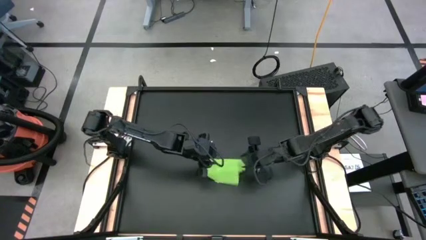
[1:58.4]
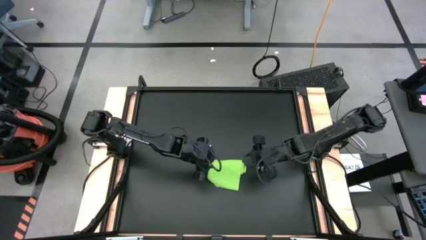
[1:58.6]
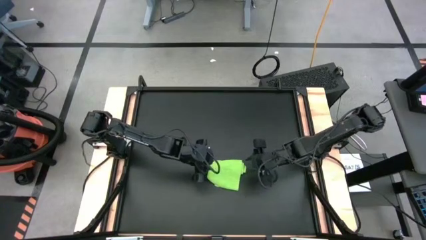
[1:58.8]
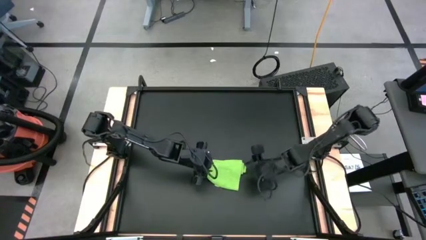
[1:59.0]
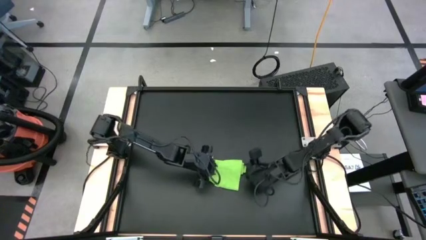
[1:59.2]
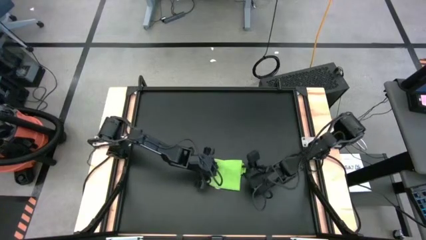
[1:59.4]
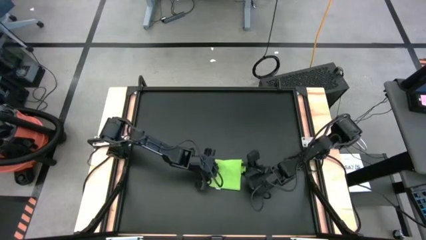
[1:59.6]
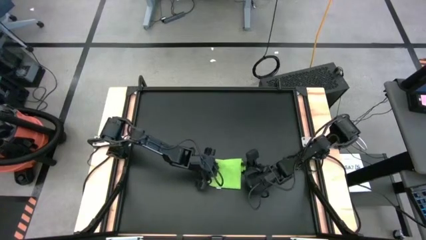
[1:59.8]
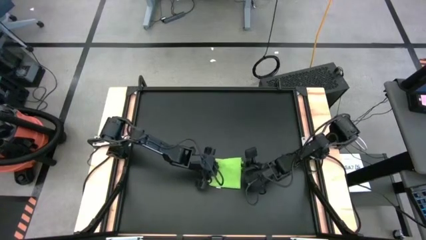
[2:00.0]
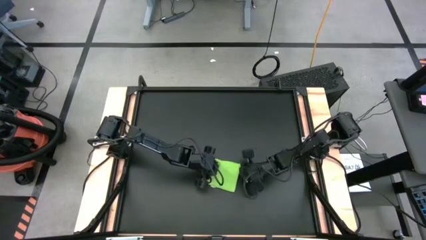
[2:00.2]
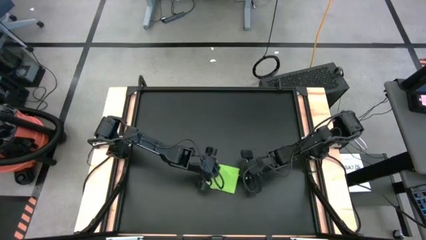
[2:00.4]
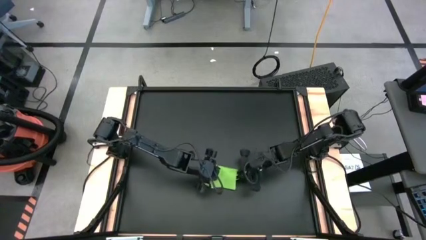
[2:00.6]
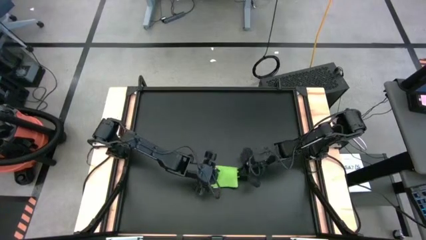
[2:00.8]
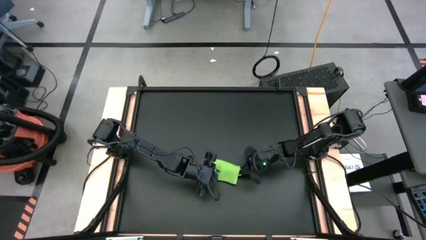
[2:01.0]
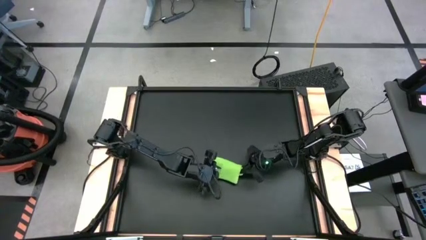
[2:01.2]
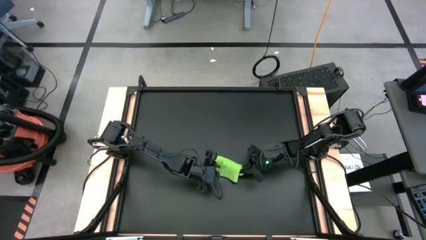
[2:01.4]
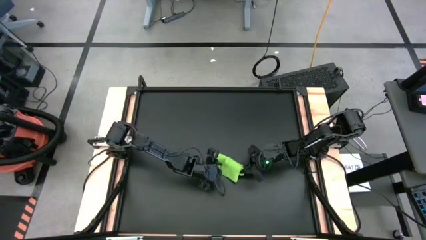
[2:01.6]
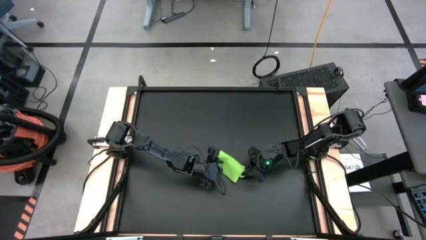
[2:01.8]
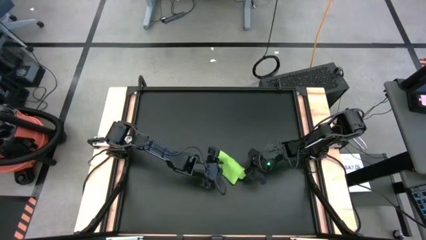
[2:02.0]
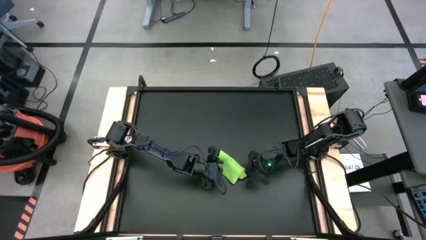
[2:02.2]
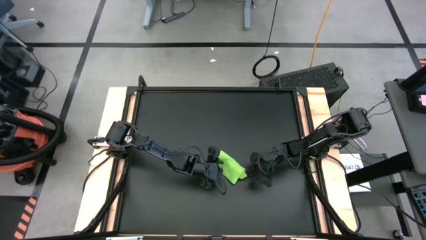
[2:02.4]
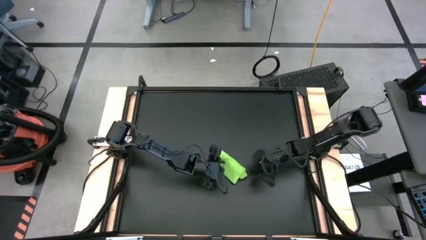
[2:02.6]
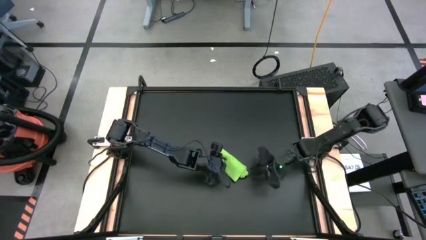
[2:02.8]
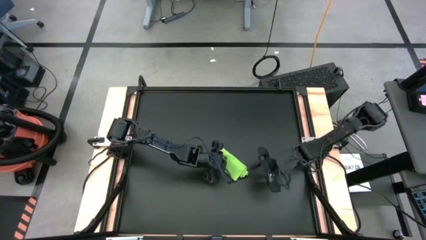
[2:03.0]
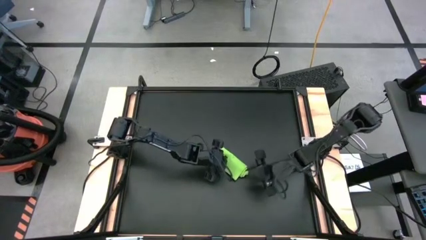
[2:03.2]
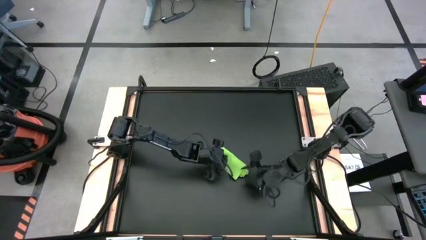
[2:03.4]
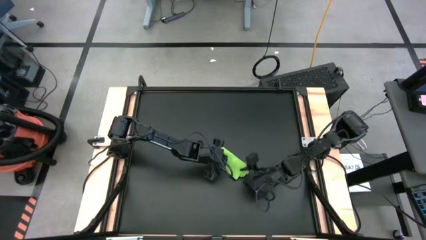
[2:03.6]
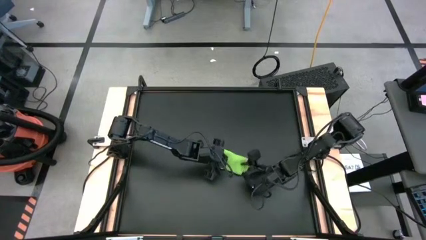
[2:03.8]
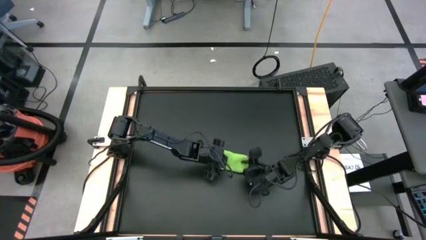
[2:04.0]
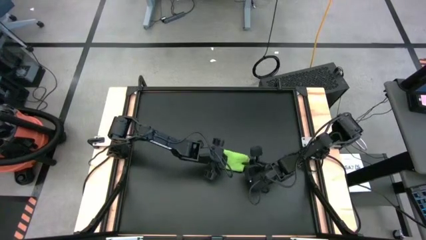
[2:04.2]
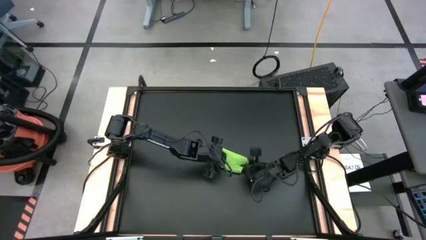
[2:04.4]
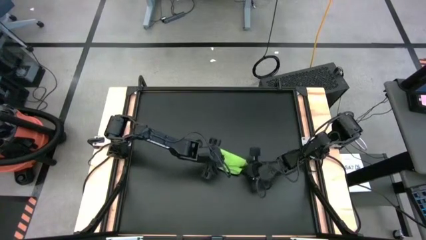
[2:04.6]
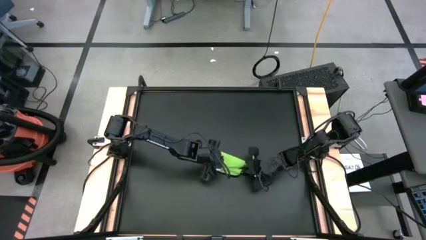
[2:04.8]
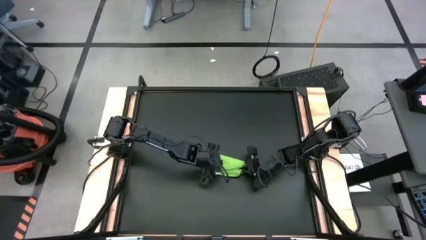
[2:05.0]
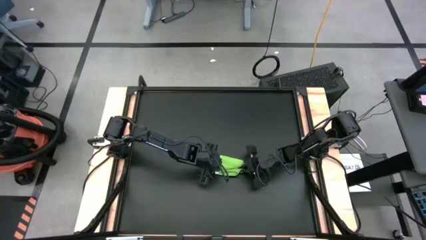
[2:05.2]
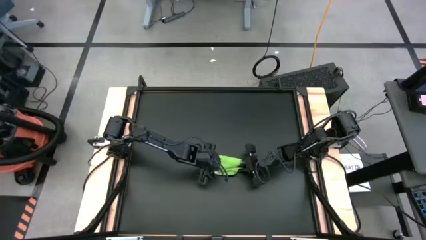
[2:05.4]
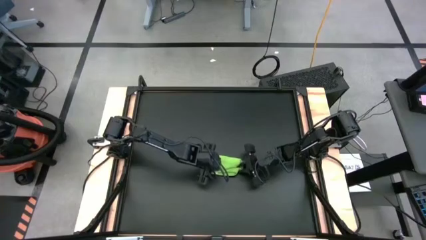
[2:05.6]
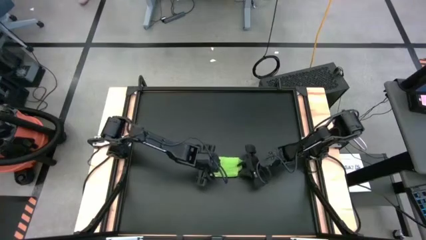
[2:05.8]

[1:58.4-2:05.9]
Task: Roll towel into tight, uniform cylinder
Roll the green towel

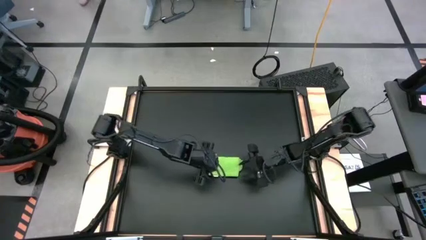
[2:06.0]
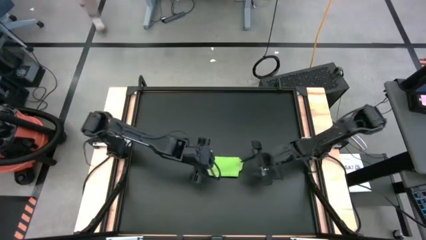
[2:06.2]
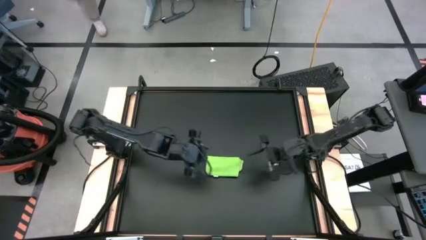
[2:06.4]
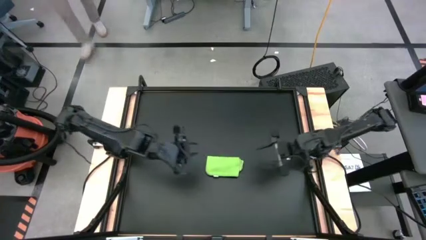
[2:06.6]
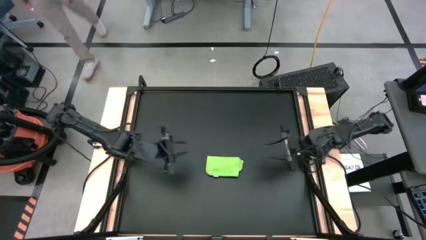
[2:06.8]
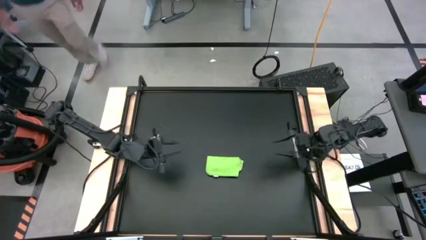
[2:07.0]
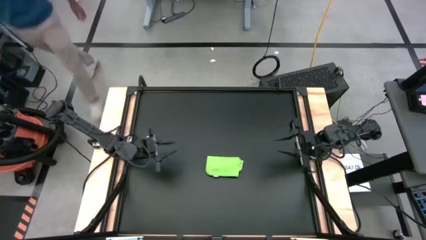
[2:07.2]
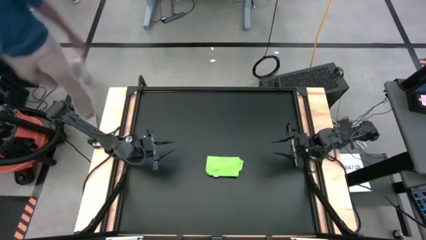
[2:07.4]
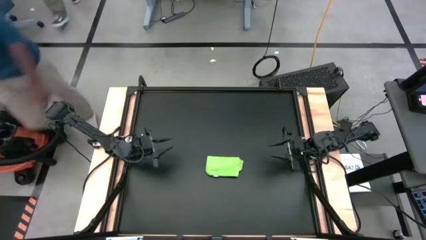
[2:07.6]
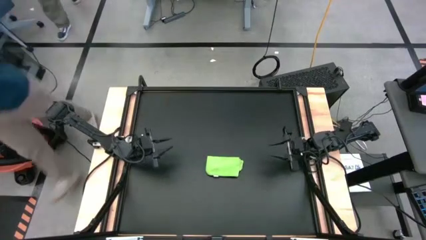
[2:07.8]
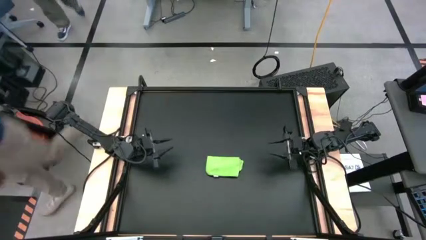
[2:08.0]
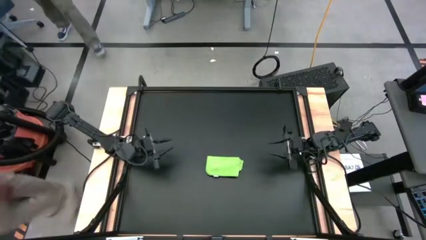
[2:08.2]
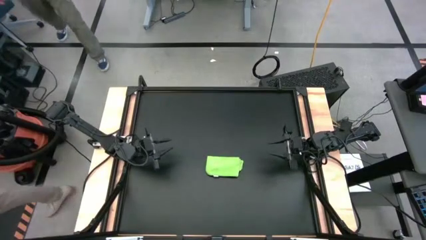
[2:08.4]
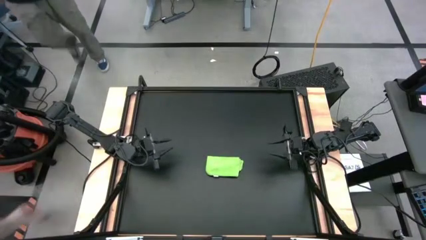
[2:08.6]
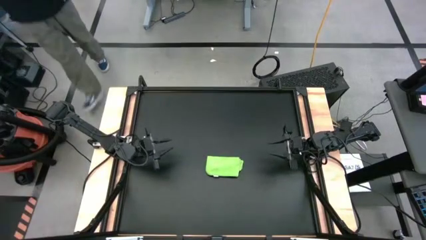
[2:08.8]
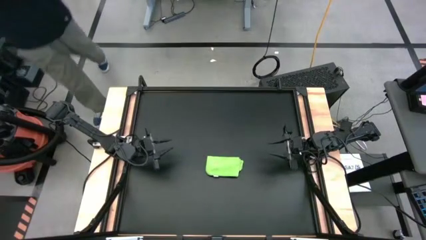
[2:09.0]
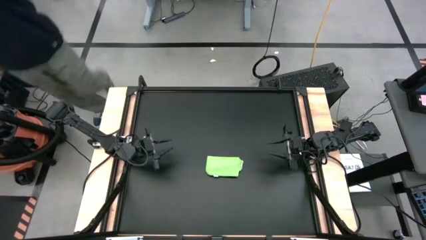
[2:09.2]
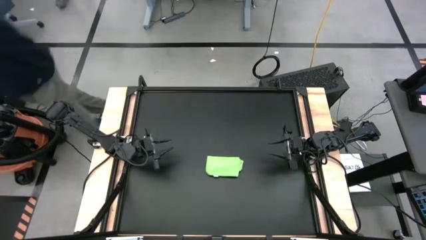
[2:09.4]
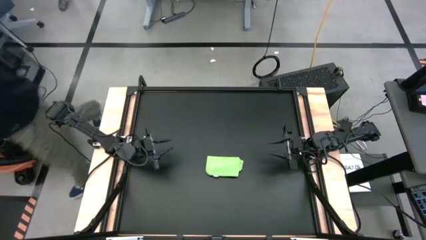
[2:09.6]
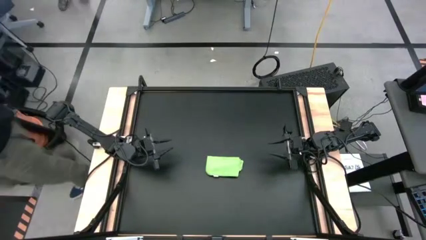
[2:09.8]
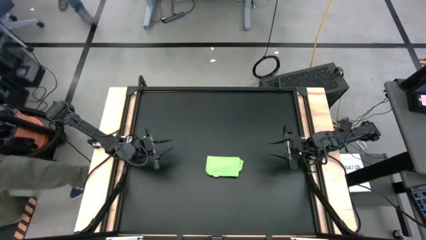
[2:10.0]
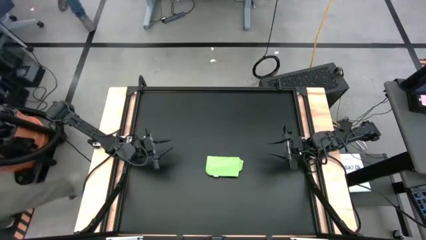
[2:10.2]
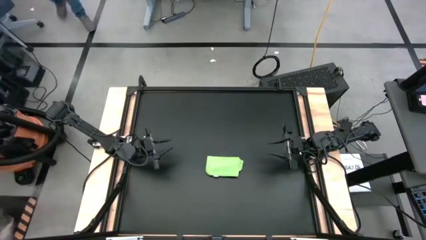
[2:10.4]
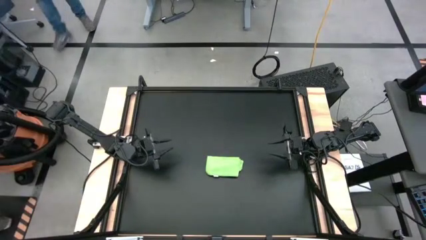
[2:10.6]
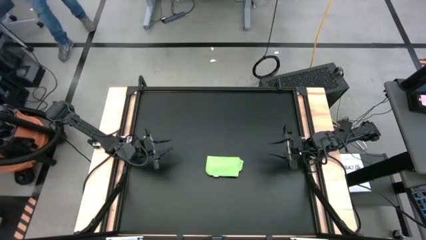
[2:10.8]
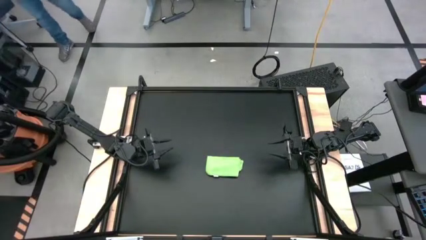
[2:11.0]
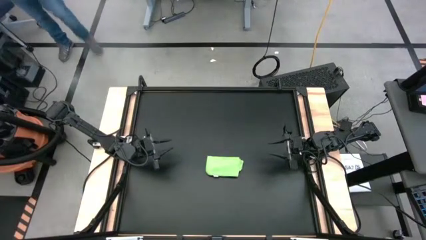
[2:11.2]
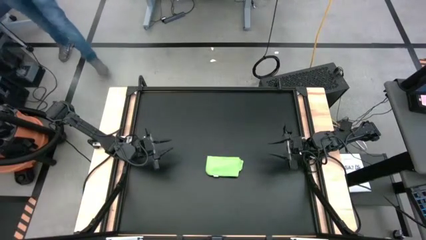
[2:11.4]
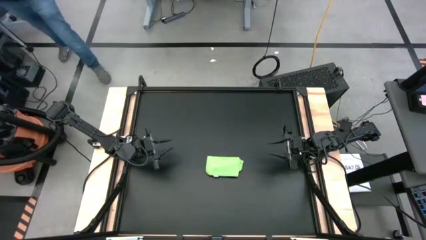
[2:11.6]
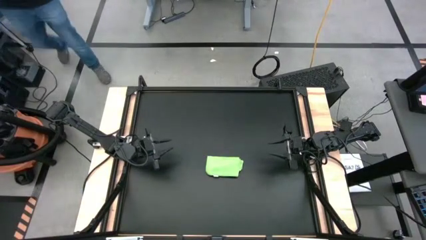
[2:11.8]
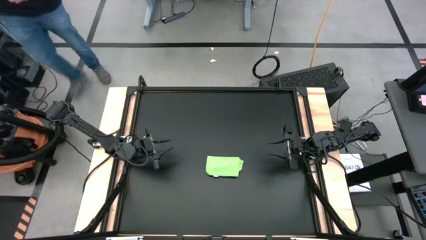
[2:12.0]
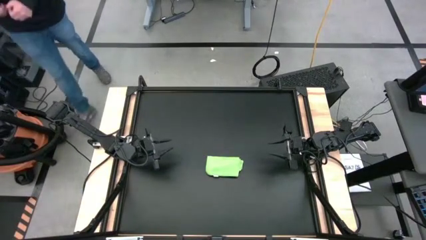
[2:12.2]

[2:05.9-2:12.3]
Return to Home Position
